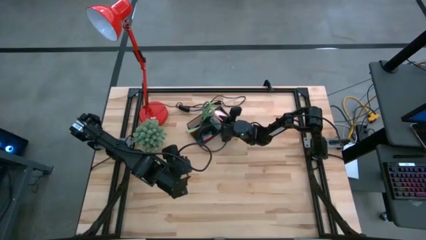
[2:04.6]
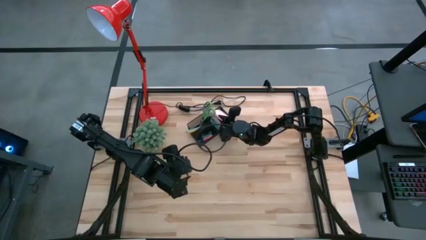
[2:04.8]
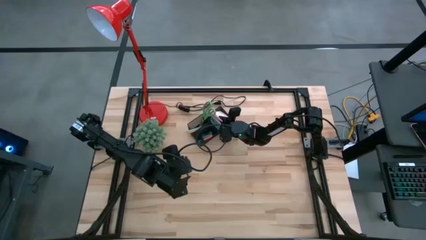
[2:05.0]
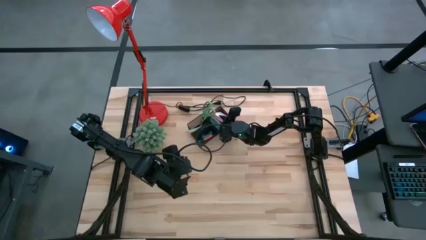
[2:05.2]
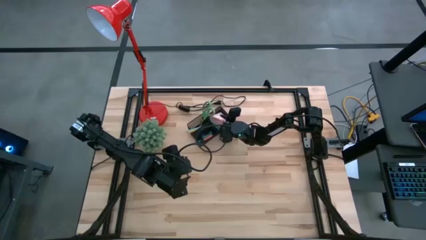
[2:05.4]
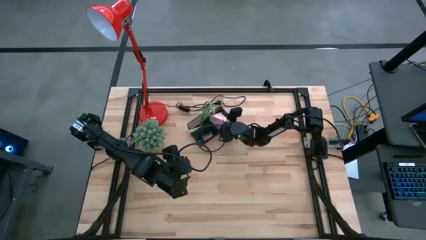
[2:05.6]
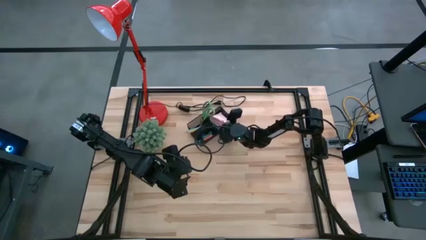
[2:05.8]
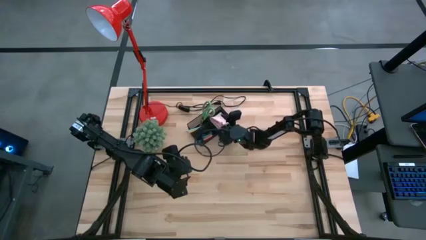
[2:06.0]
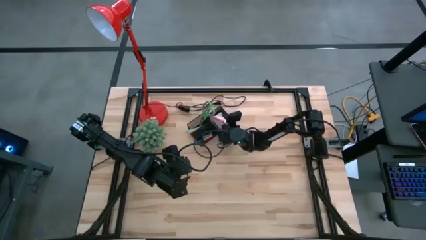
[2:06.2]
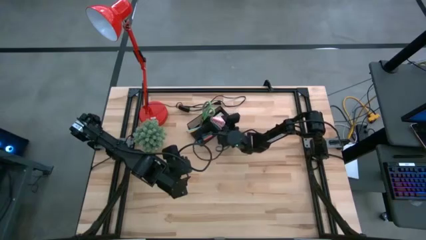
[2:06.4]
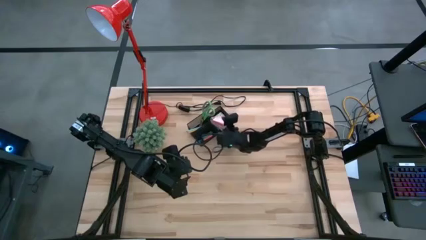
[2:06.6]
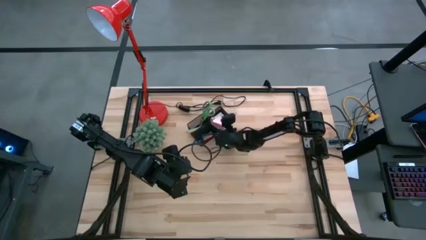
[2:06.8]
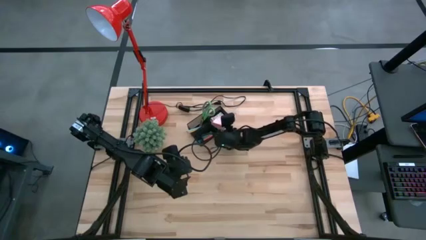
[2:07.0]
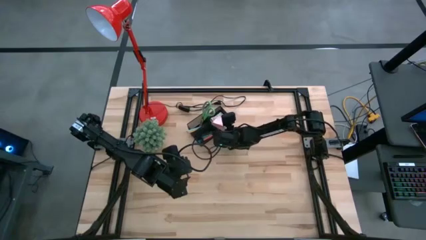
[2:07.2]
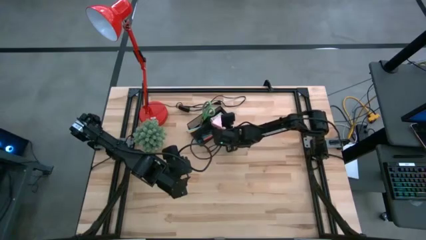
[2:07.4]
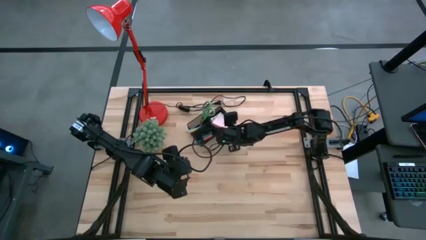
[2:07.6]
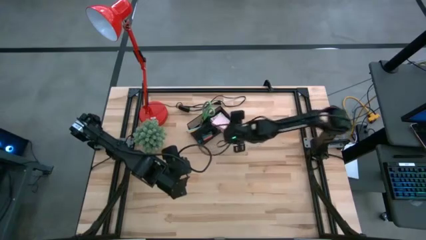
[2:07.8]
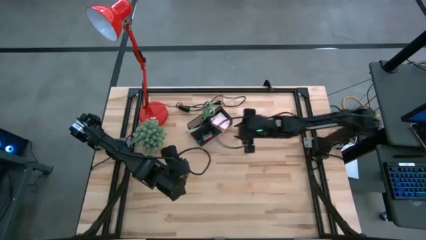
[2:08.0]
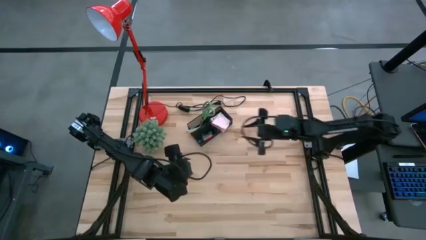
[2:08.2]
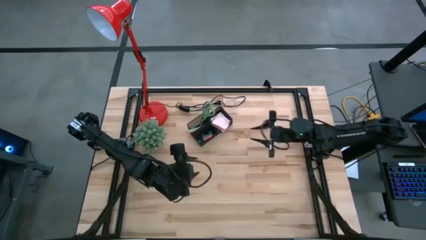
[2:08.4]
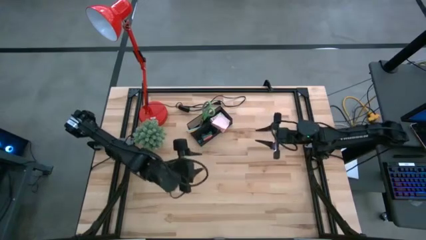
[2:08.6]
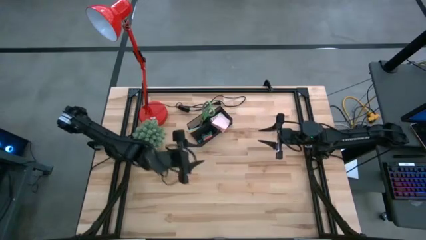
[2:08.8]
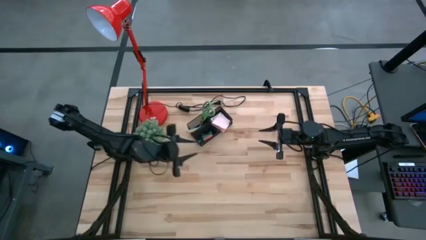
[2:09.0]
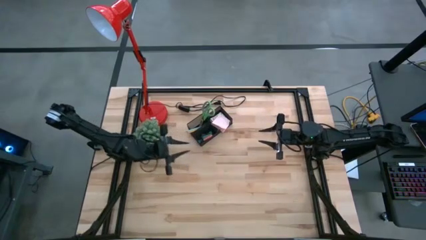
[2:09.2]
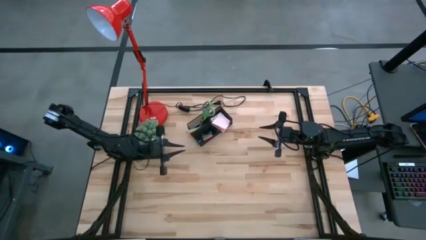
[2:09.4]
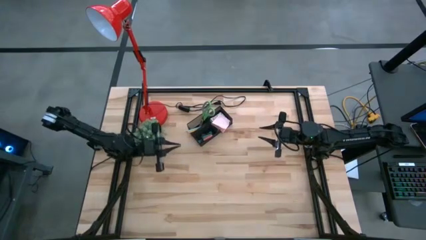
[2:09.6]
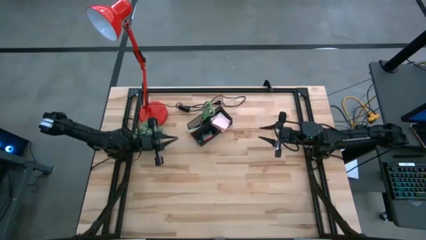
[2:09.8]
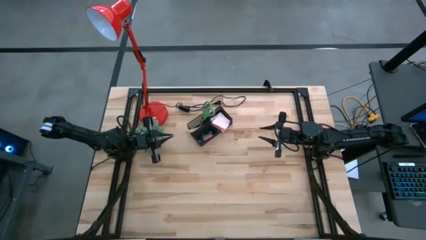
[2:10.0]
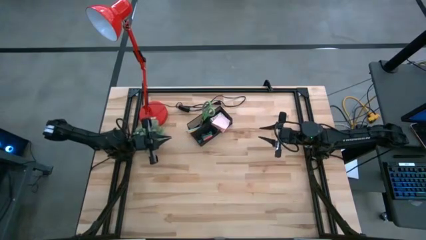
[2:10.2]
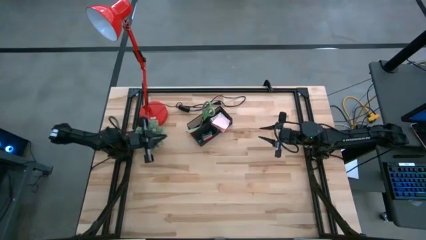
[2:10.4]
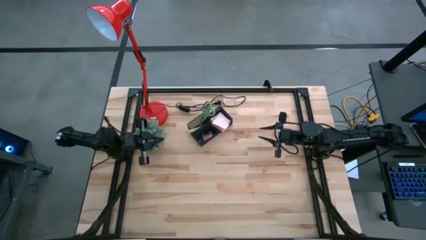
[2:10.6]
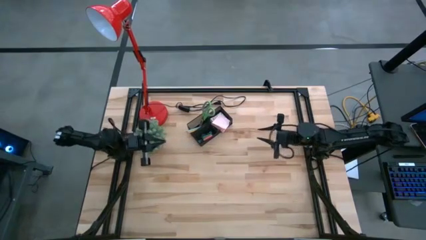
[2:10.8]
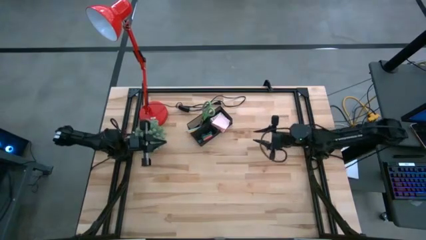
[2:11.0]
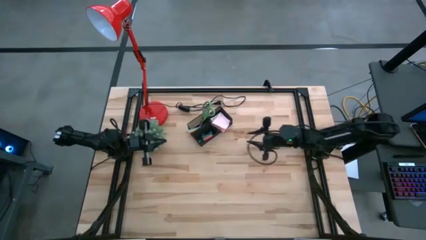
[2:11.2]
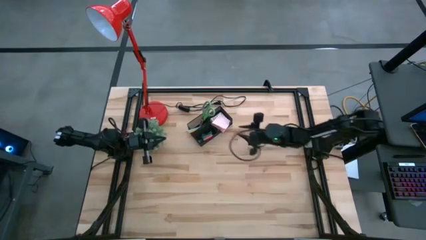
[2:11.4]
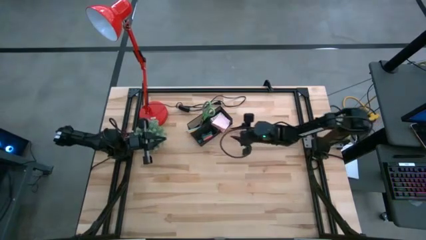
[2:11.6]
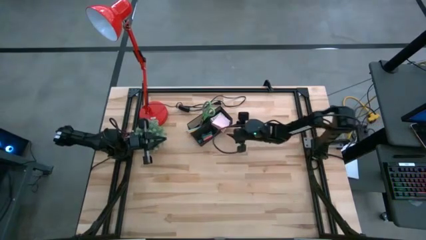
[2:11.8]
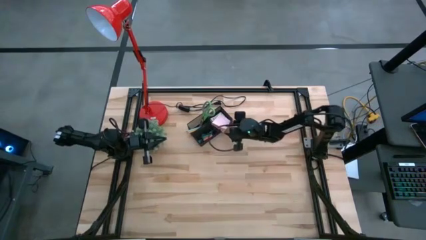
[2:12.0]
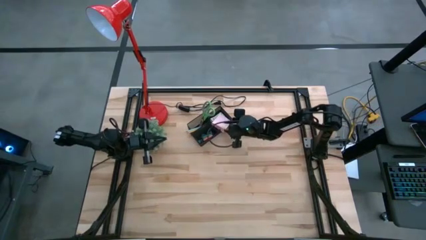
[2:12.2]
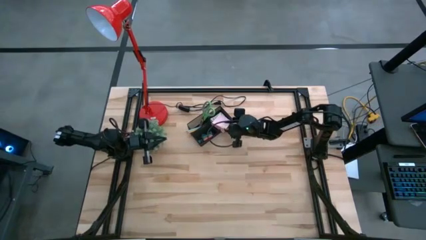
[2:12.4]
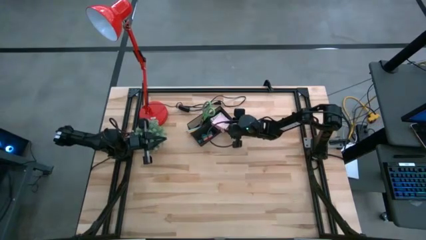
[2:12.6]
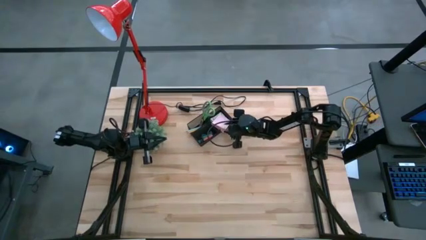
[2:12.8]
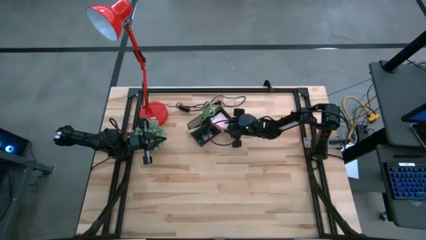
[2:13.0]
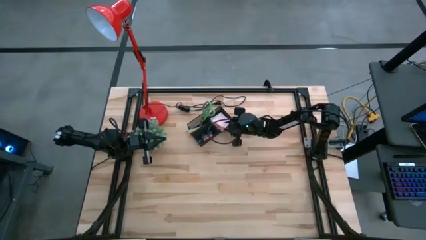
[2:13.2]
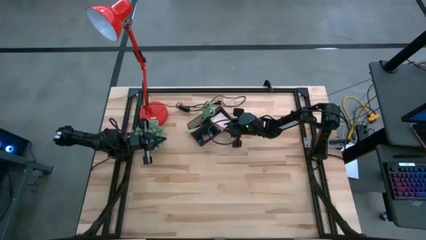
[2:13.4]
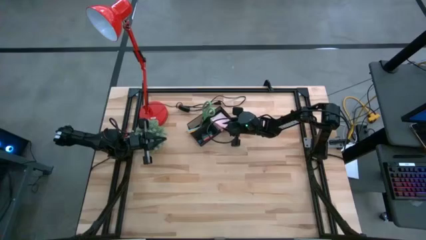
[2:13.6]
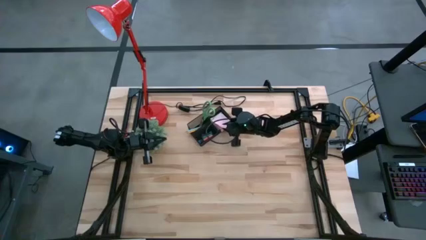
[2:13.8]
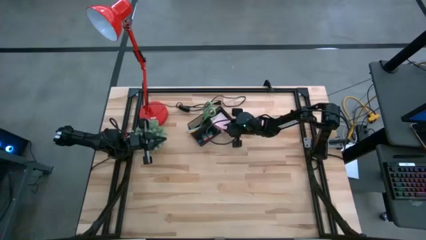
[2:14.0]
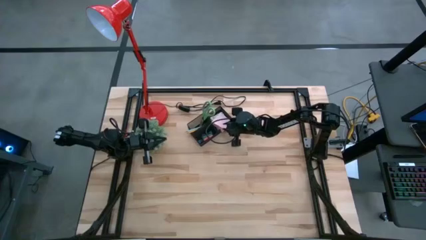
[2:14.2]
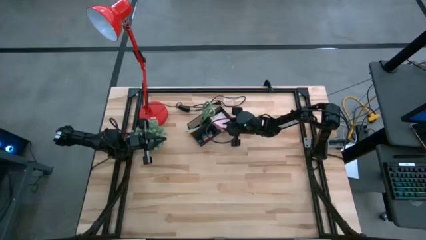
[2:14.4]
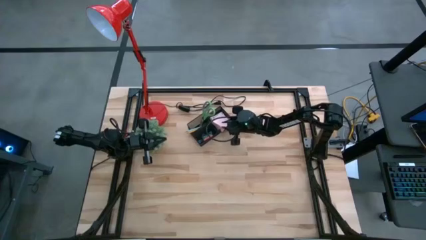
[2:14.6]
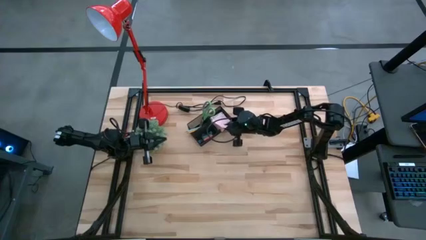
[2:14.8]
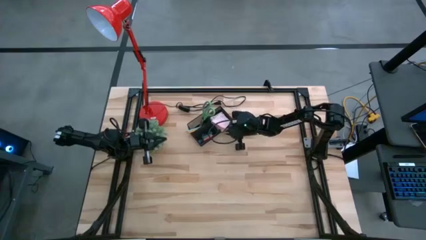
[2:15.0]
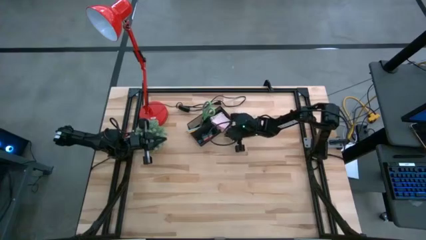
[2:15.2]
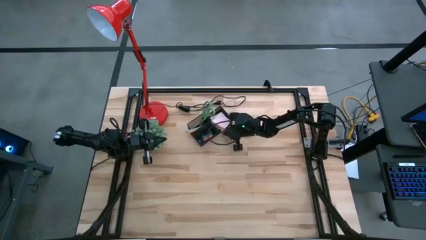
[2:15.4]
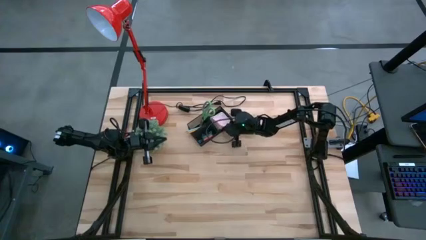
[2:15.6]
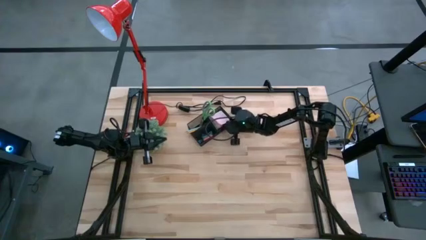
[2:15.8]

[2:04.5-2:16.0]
Task: Pick and place office supplies into organizer
Put the light pink sticky notes into the black desk organizer

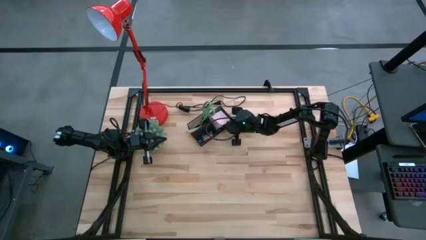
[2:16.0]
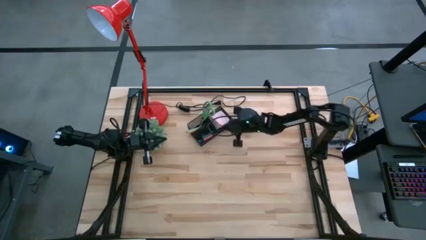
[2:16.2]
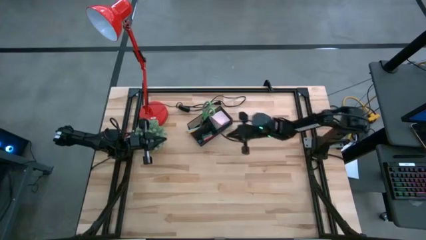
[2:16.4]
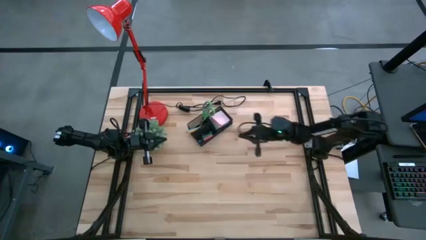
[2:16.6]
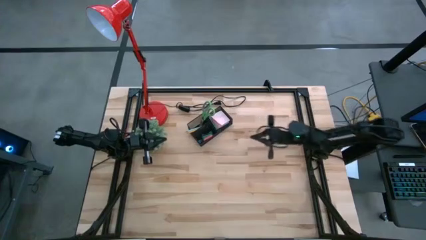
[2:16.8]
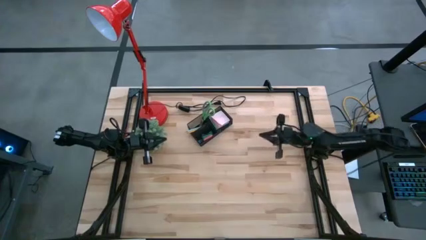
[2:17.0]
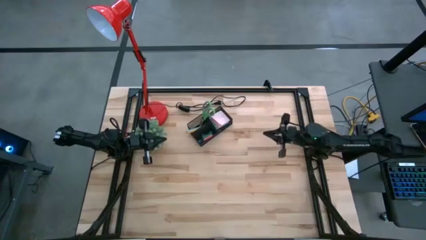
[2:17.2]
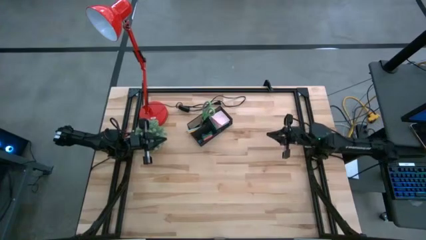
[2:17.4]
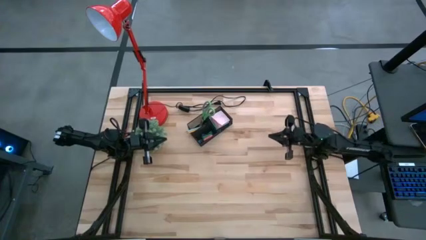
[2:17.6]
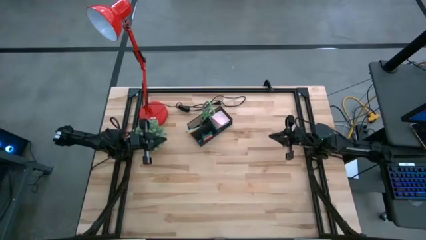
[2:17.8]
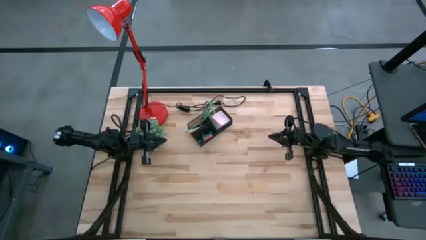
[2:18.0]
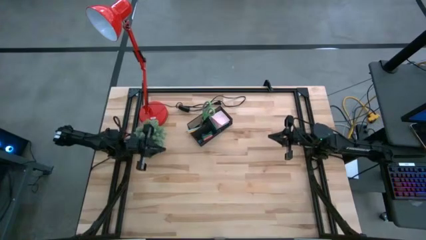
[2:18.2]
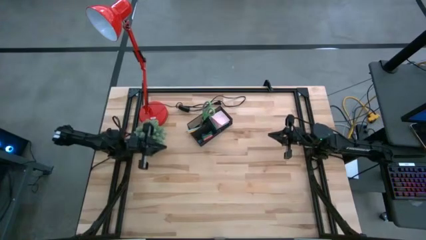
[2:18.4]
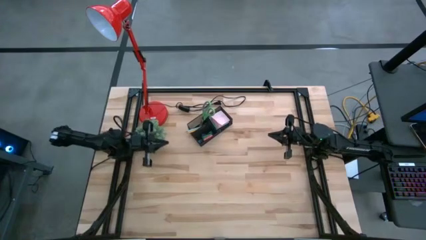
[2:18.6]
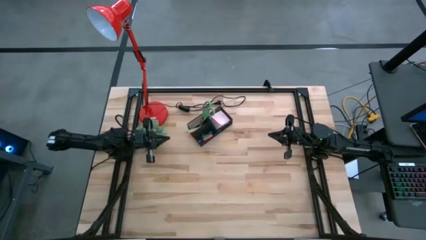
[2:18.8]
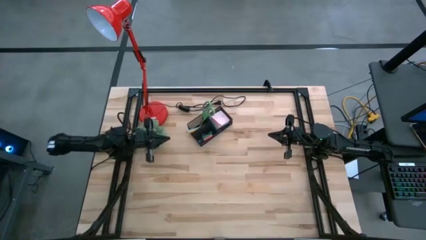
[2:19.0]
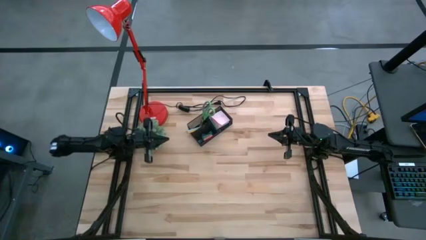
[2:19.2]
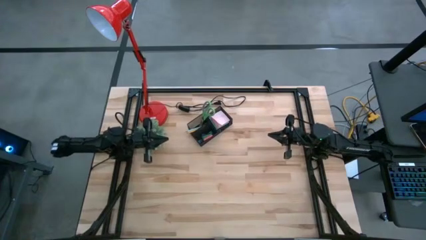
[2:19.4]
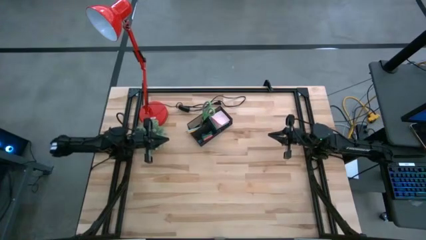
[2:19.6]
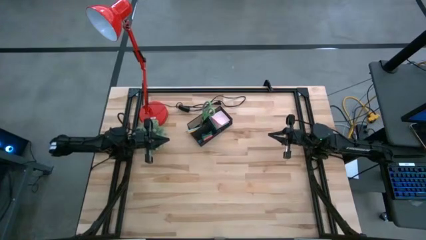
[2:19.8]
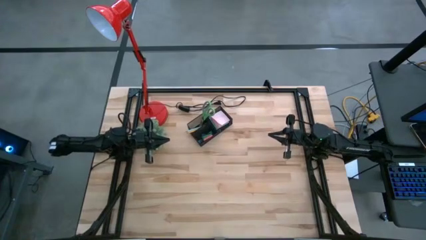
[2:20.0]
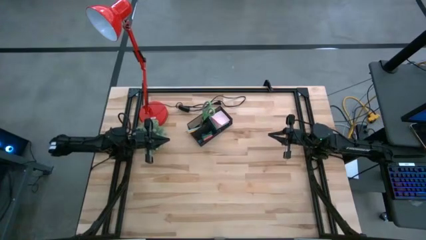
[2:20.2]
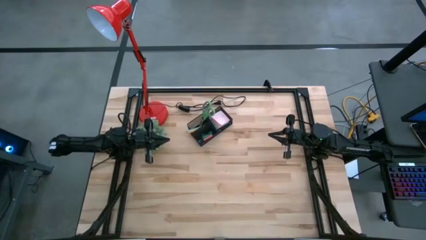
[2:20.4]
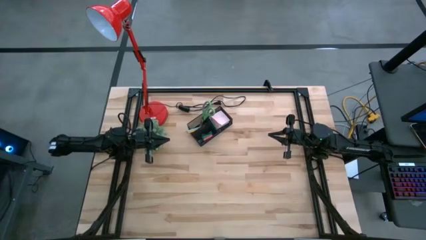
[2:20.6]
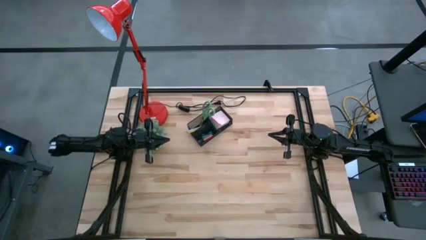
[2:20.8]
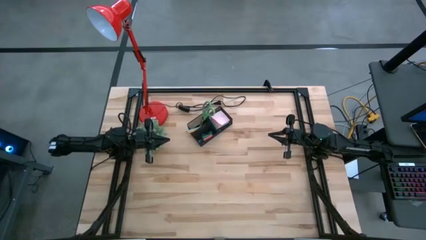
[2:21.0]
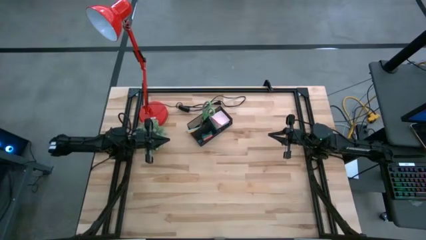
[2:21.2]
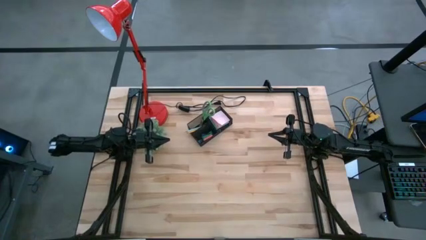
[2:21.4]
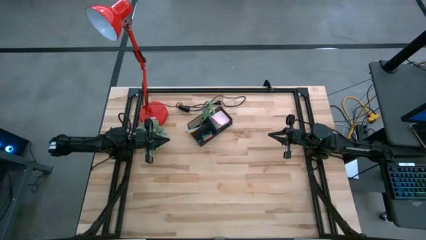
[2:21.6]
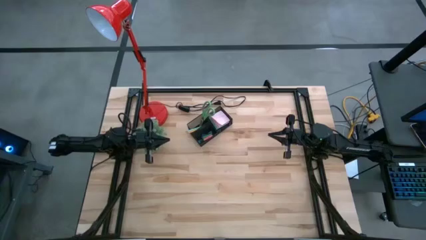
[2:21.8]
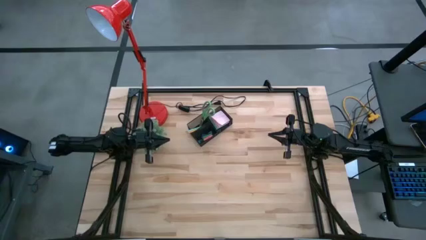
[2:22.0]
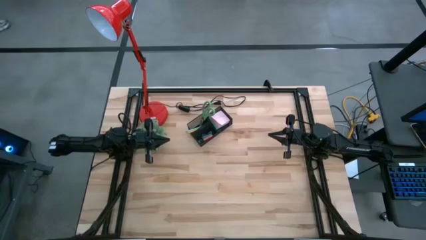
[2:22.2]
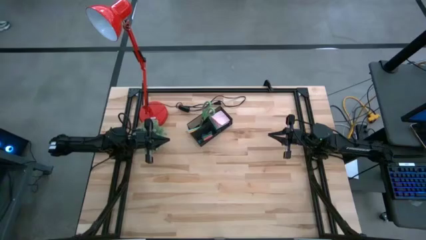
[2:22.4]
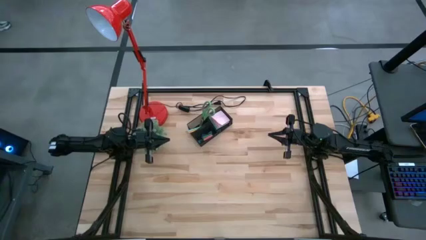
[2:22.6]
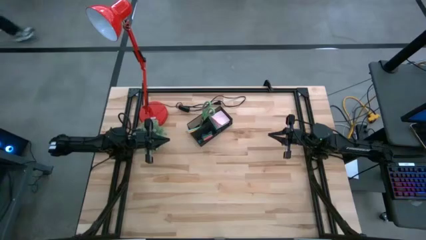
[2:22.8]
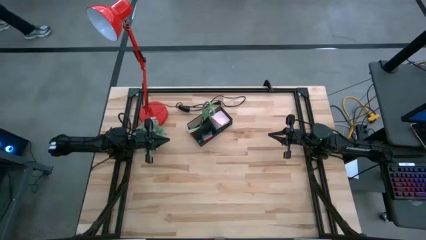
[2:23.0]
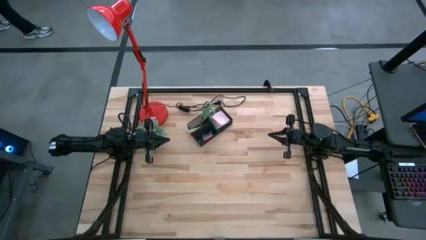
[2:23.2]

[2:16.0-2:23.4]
Return to Home Position
